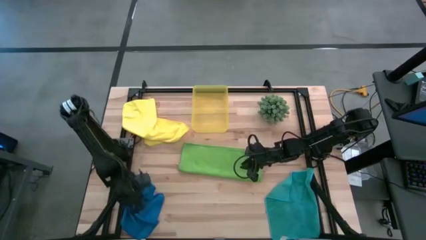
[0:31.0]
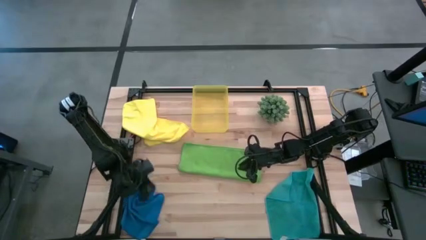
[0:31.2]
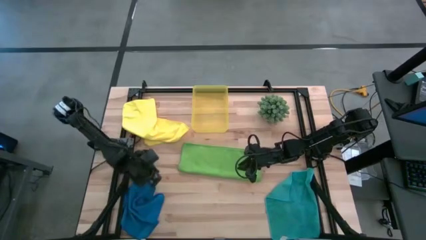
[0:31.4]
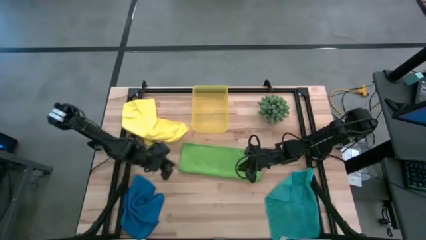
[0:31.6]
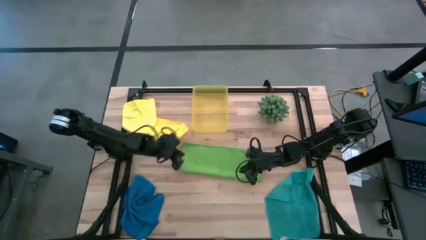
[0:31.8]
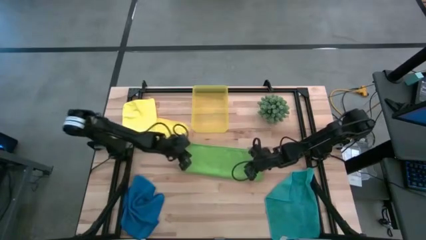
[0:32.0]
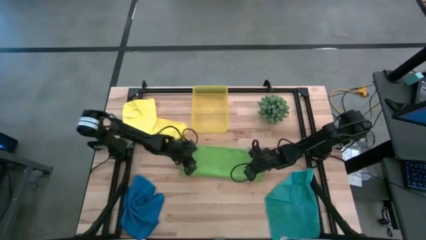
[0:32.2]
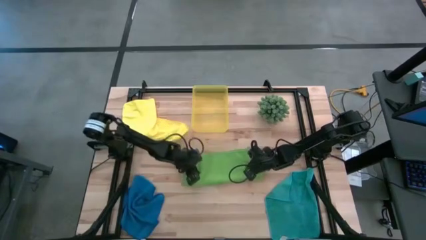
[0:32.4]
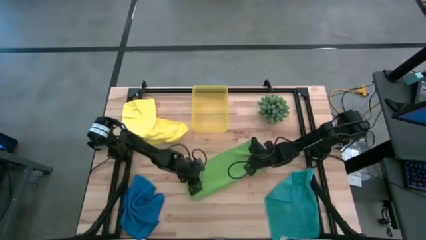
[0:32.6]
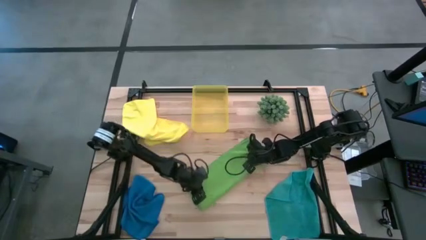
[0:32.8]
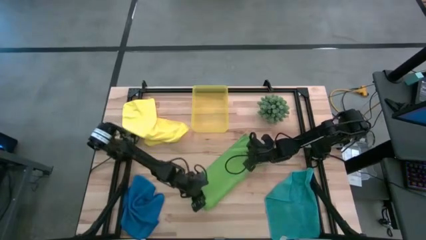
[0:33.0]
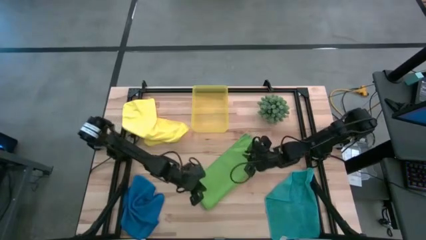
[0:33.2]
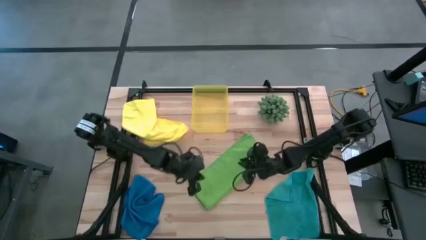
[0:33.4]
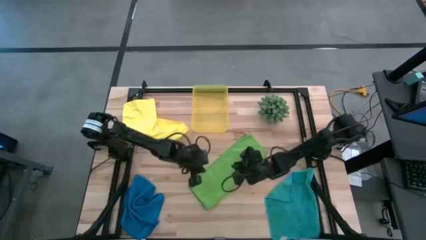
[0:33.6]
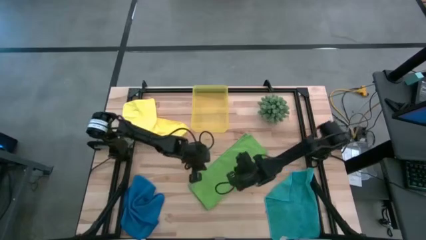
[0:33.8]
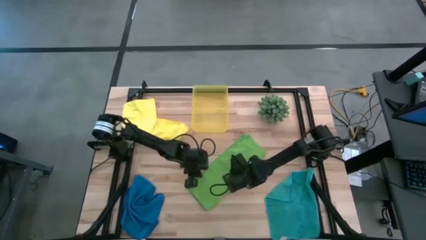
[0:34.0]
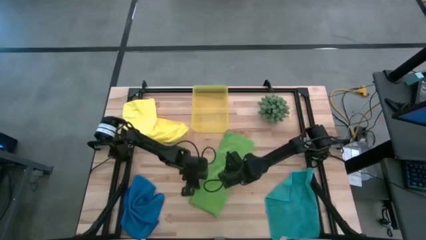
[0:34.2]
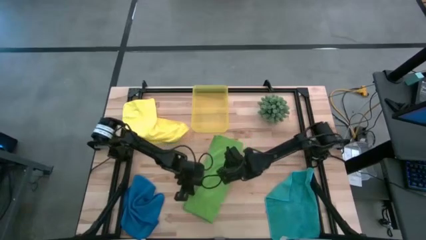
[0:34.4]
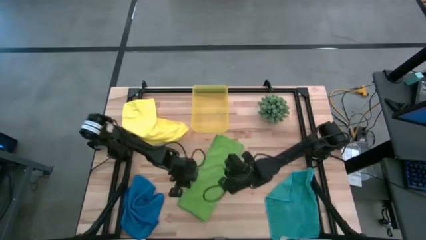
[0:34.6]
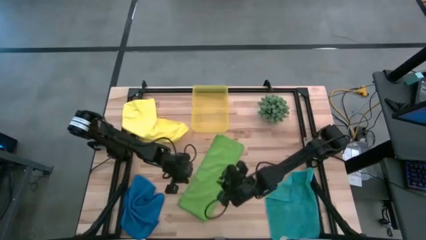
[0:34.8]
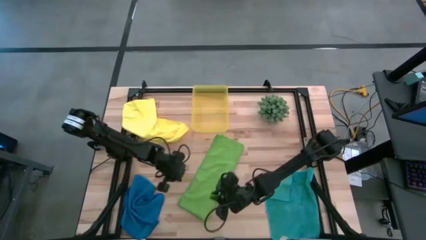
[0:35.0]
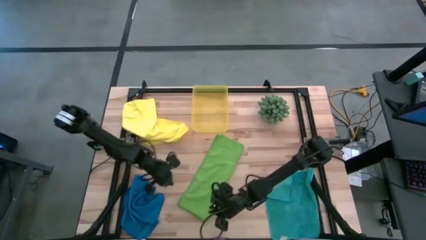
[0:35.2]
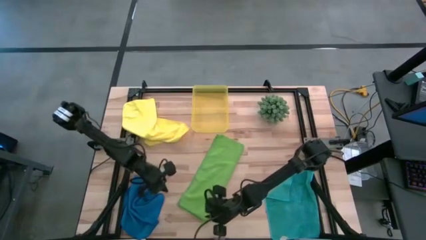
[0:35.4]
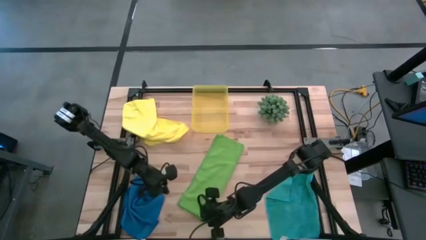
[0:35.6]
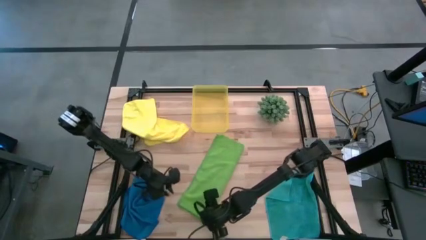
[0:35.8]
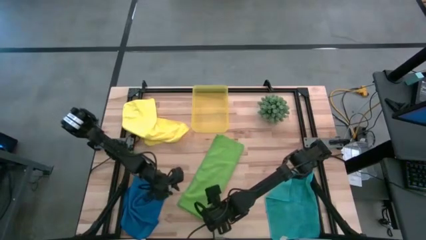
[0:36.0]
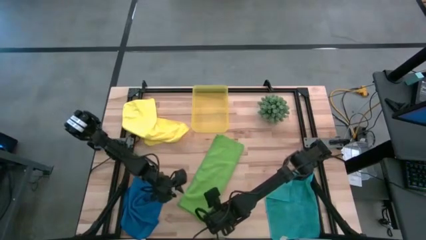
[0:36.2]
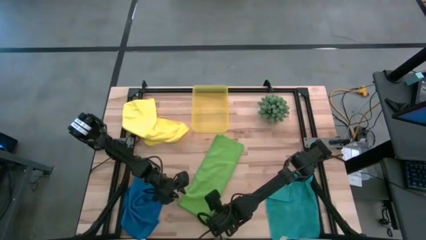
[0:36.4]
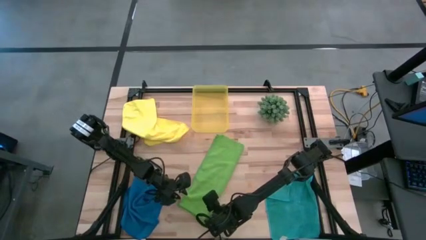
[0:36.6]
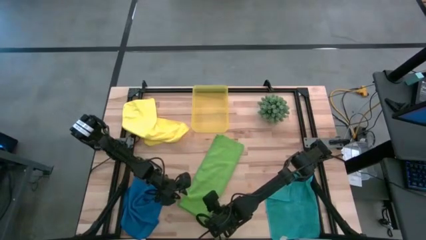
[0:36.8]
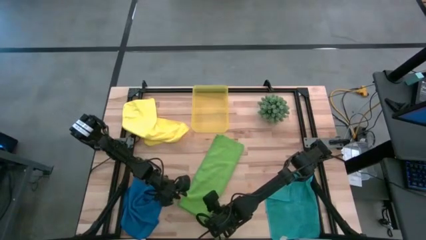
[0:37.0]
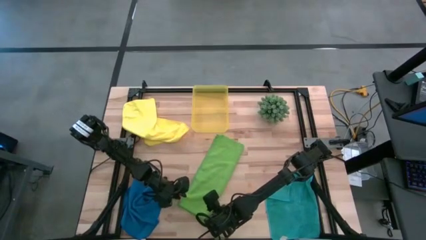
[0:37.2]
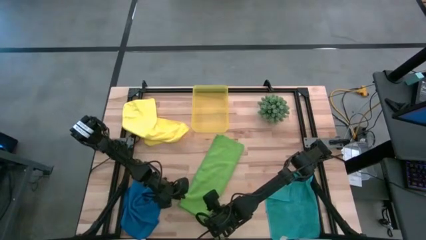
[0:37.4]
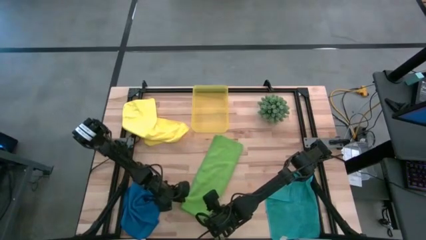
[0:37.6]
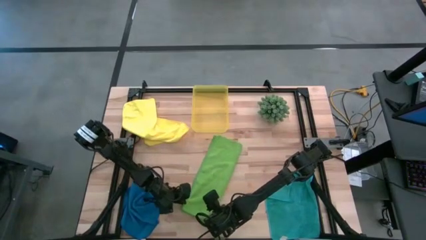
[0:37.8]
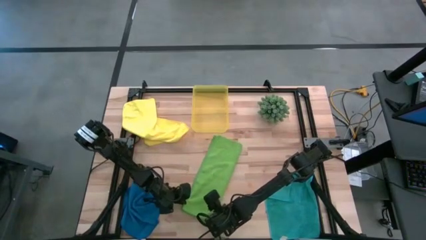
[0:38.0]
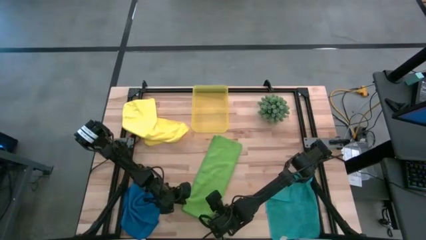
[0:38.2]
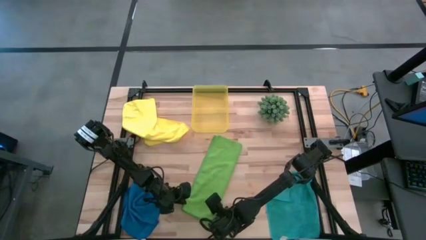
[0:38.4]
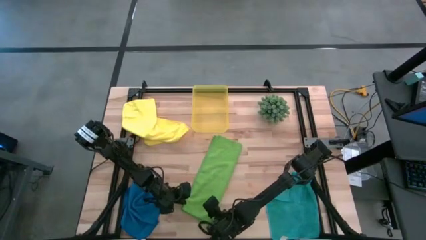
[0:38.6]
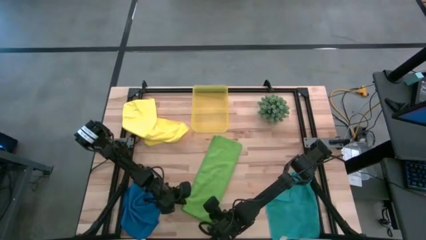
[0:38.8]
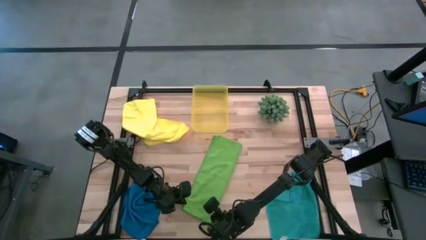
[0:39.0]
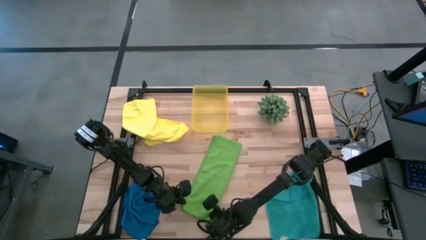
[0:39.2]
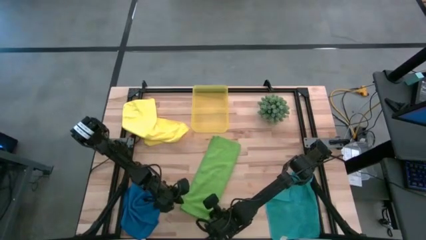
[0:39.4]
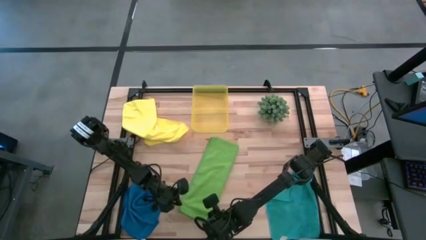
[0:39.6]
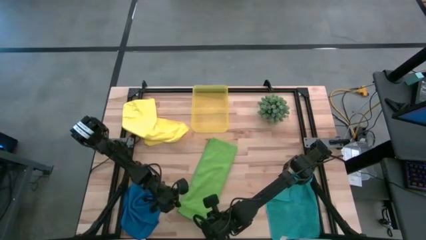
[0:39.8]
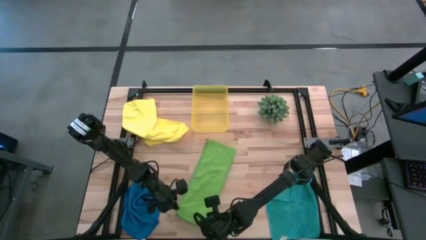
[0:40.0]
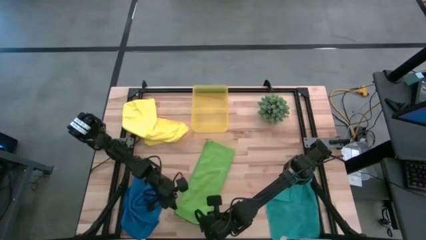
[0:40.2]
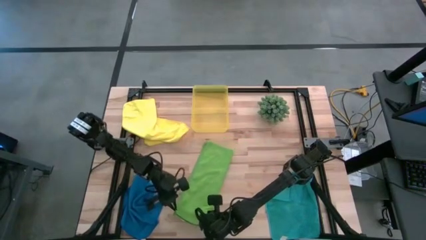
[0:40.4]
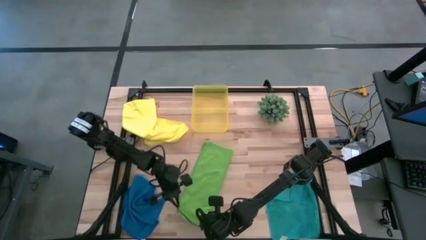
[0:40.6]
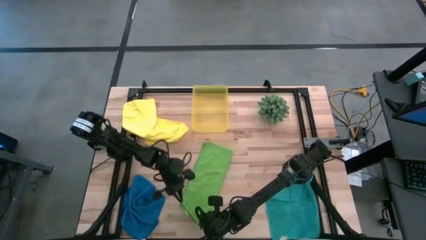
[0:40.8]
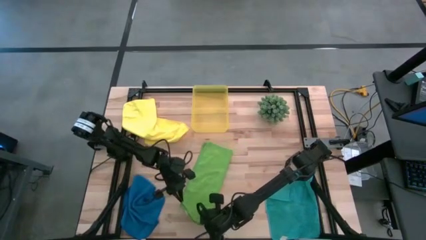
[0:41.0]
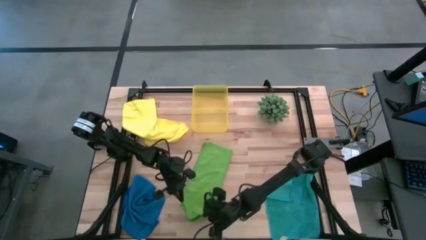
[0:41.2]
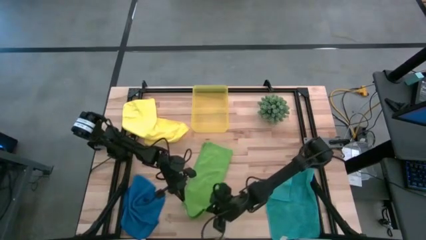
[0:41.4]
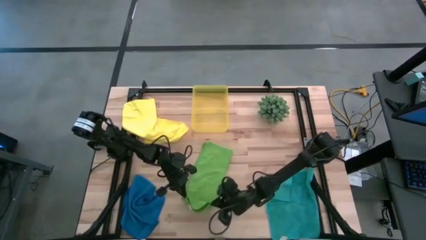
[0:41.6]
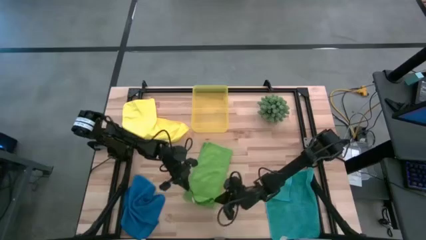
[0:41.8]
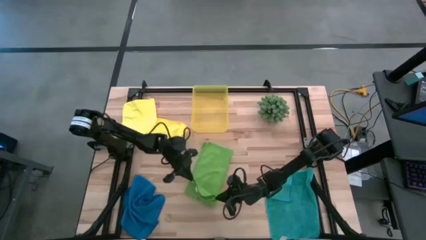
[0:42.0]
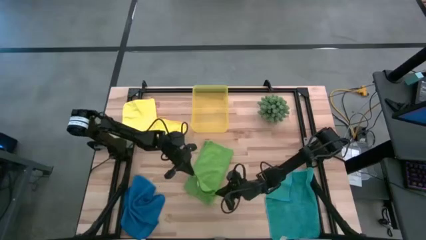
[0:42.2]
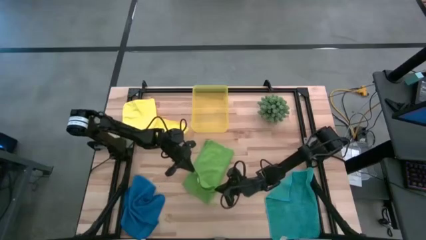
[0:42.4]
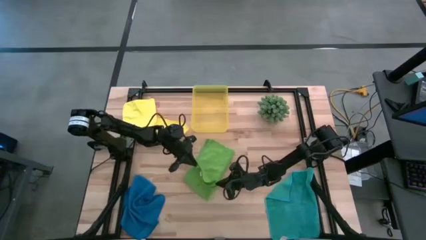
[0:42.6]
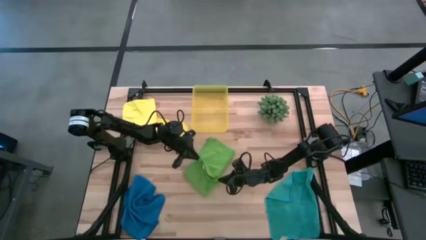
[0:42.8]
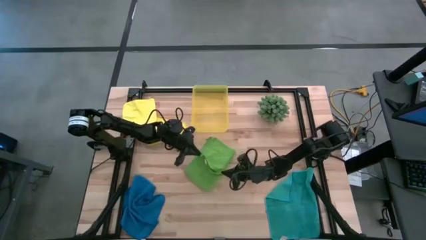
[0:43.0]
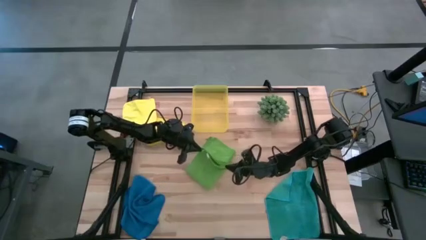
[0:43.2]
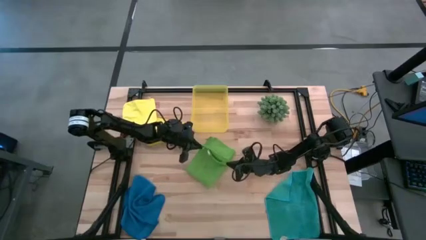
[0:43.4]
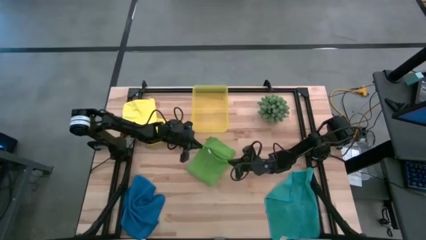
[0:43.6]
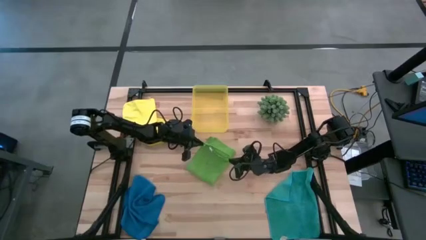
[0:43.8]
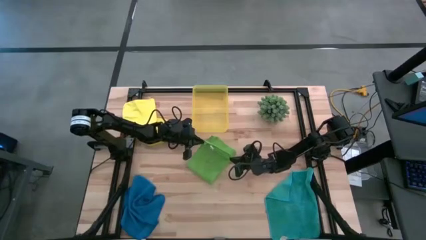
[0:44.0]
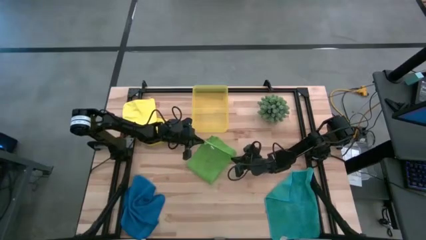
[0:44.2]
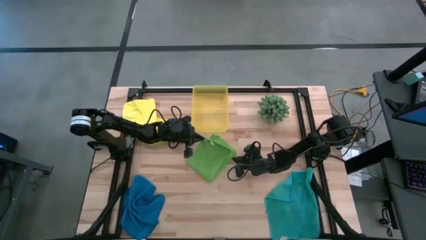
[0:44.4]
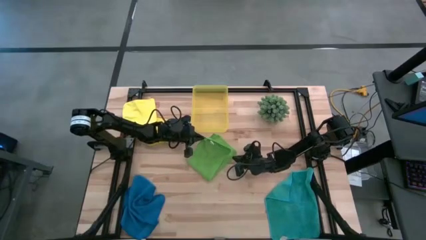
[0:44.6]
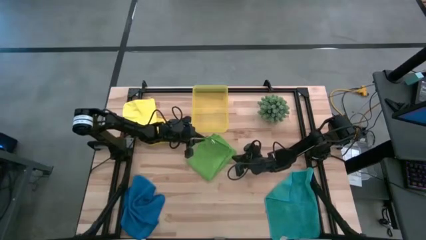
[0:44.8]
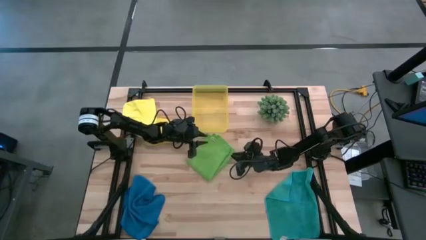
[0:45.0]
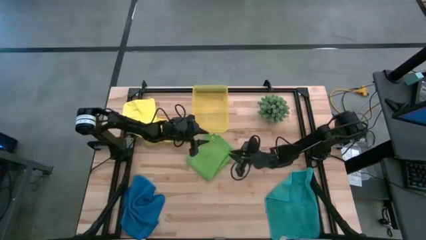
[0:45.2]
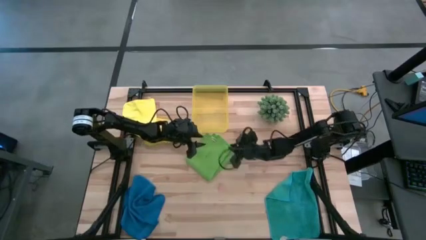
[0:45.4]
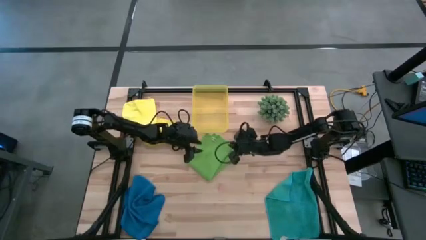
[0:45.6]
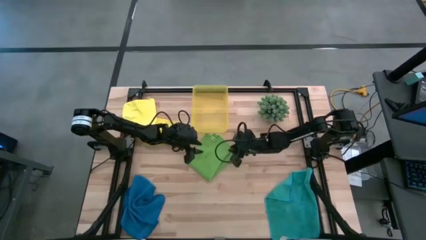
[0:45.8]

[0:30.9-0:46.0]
Task: Fold microfiber towels
Fold the green microfiber cloth

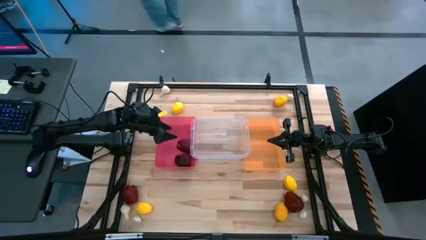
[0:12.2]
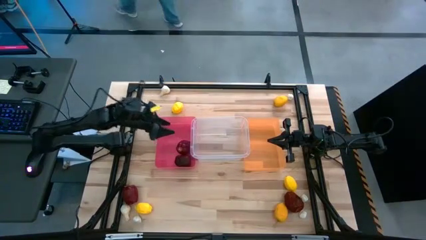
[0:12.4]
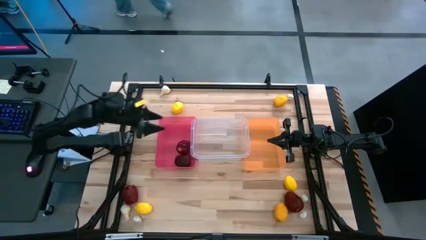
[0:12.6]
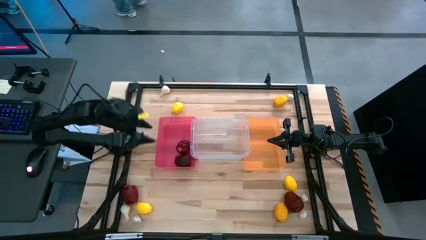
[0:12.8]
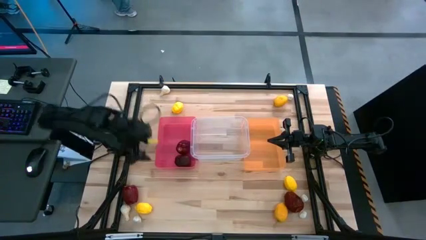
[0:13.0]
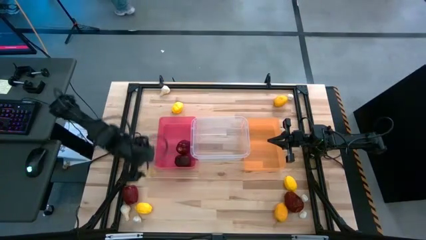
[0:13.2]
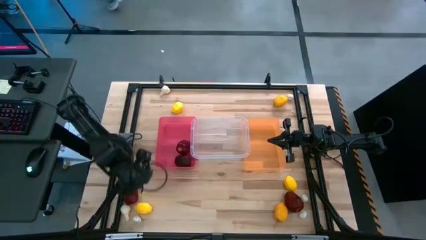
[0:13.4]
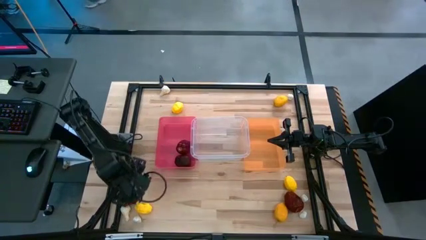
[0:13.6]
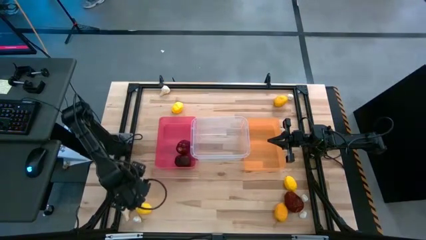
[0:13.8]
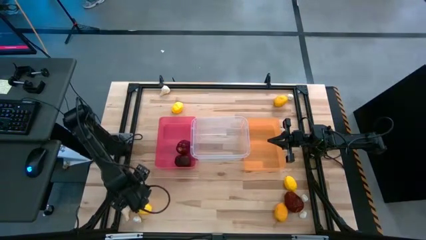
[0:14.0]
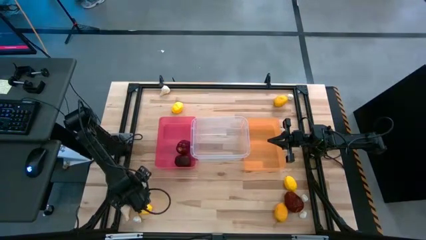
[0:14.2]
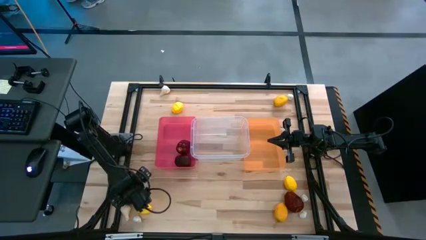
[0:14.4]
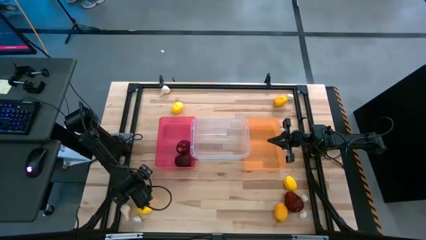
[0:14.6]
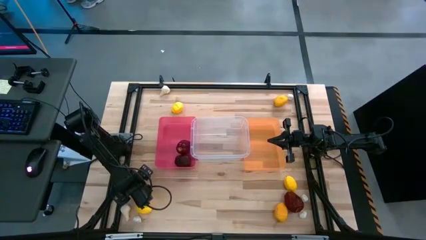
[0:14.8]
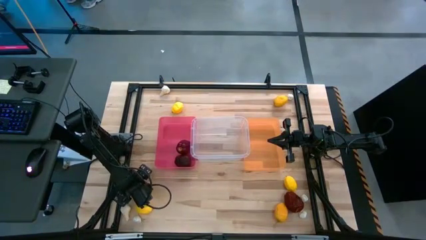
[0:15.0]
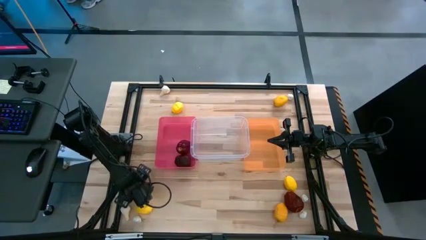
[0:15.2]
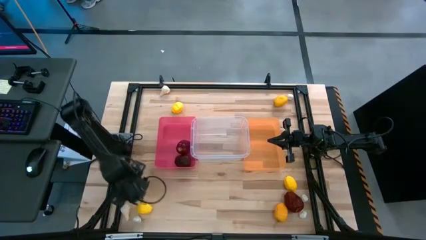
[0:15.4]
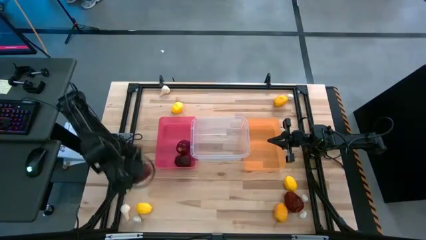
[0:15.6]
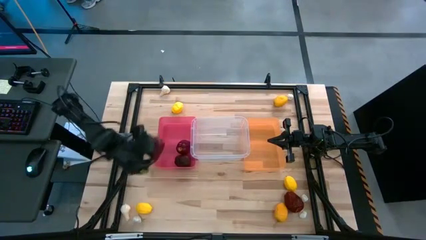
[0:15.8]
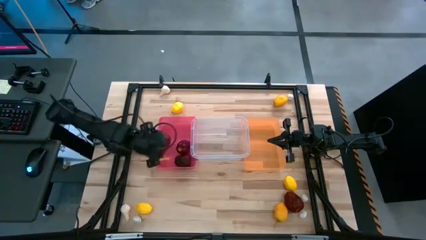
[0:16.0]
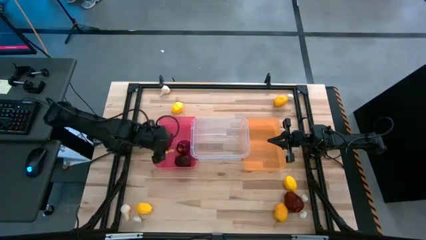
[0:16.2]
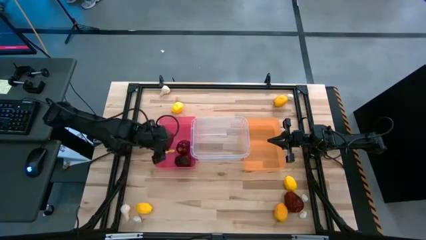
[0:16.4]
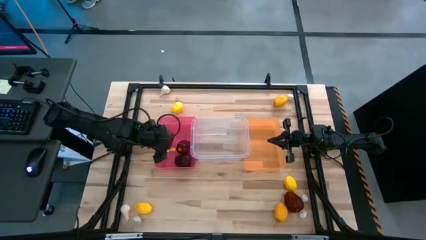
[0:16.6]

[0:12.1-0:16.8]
Task: Sort produce into baskets
Put the red apple into the pink bin
